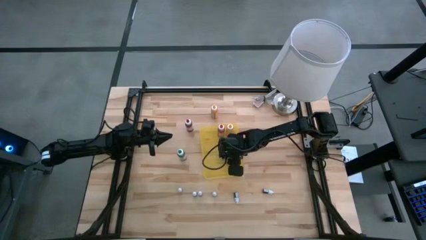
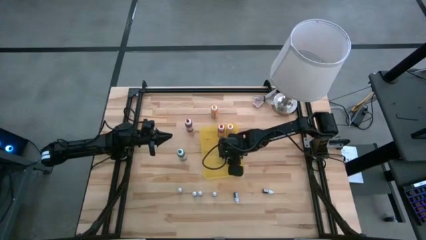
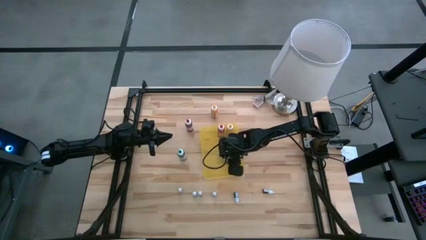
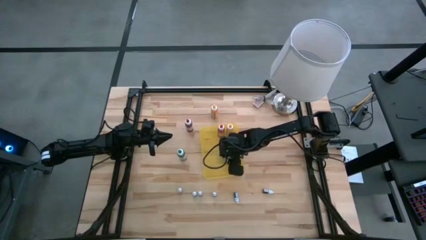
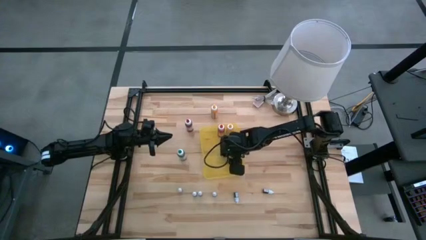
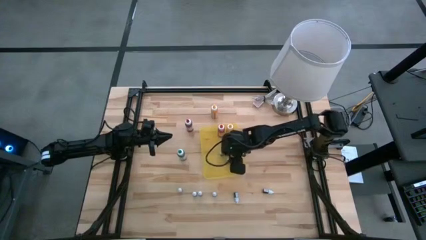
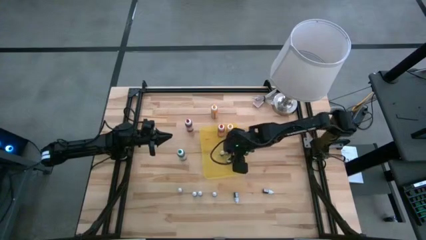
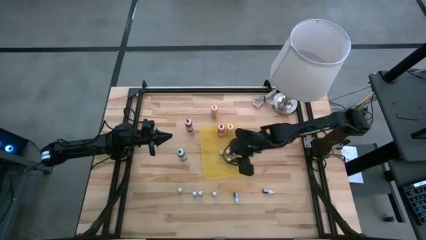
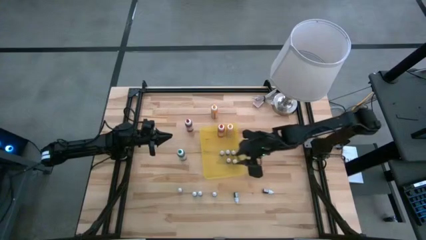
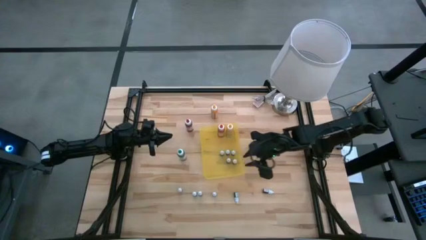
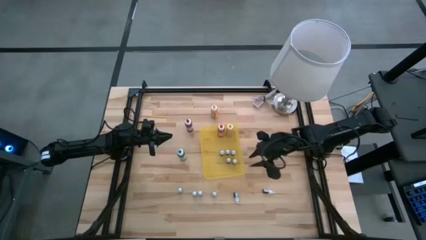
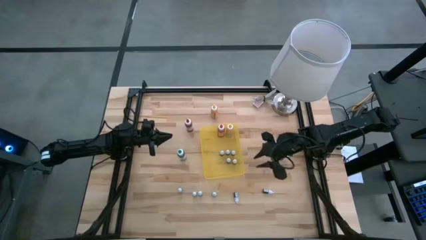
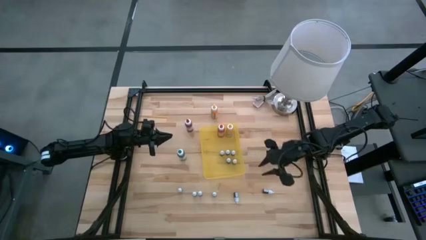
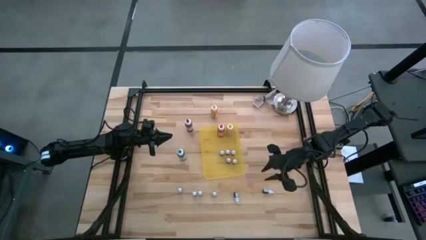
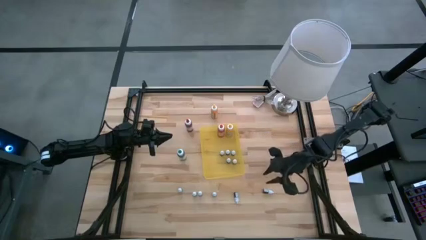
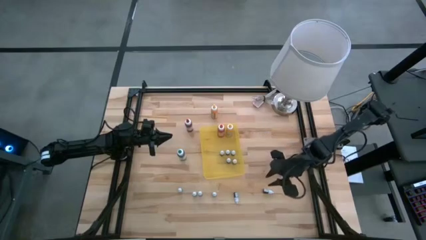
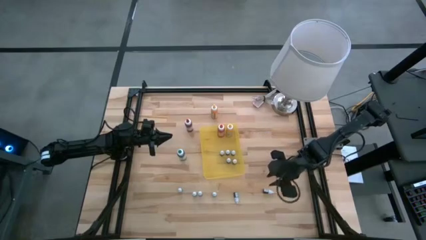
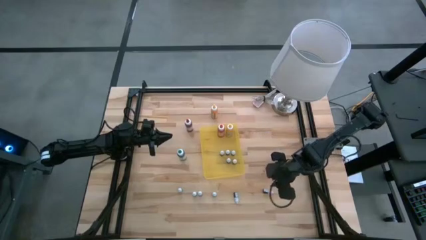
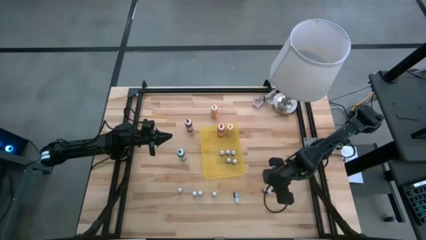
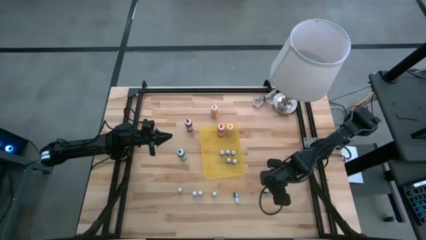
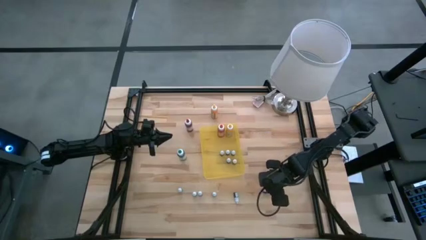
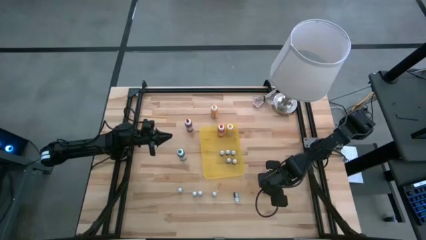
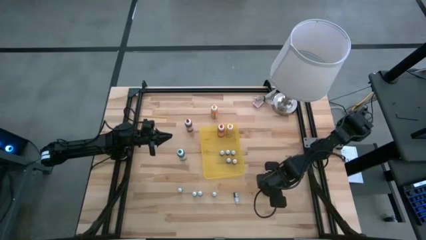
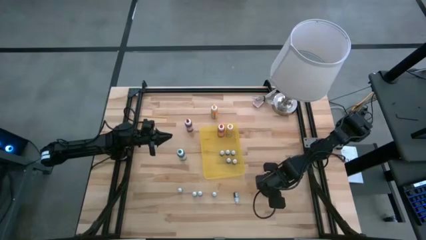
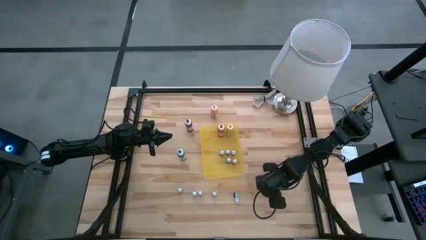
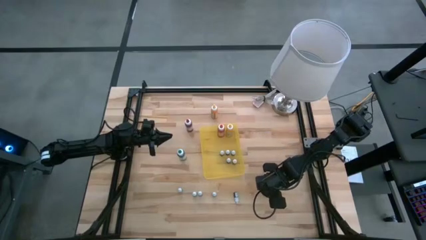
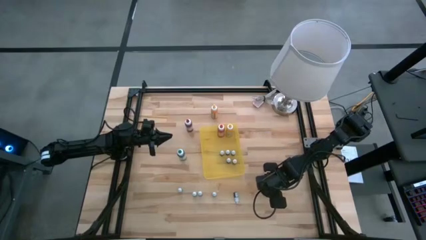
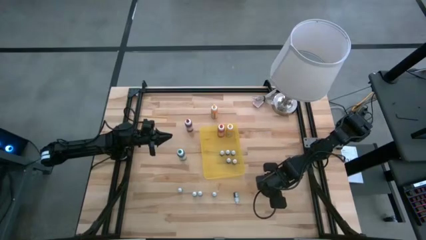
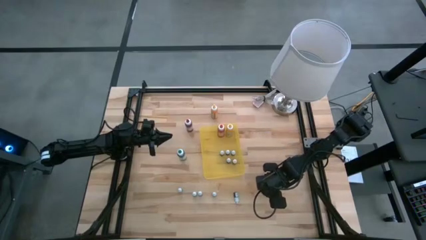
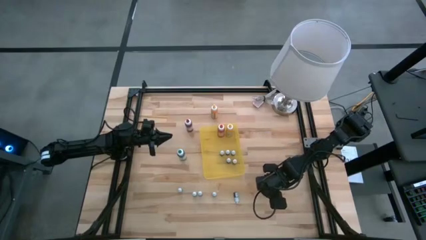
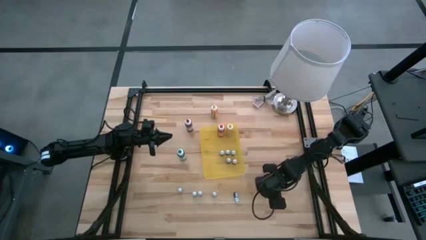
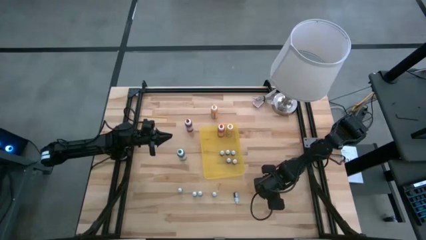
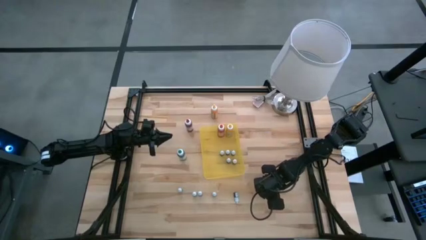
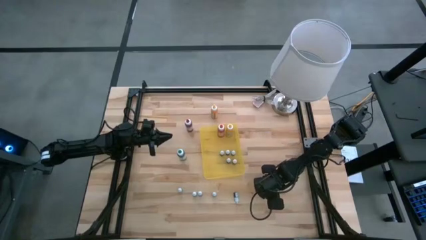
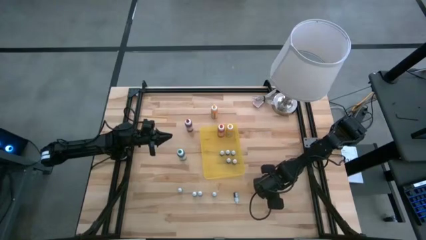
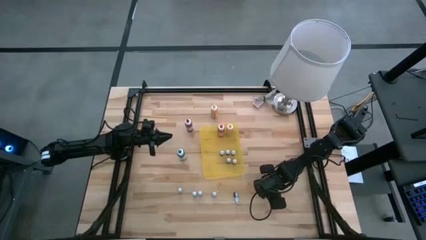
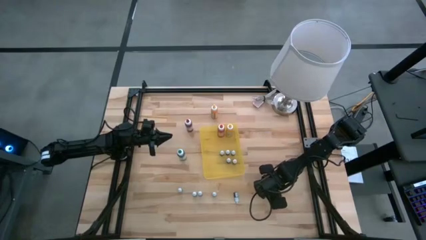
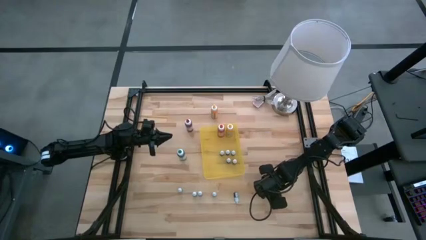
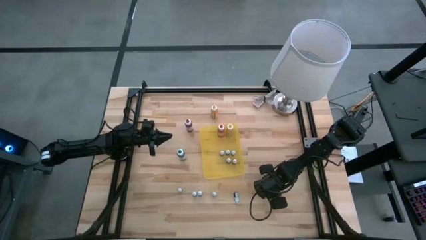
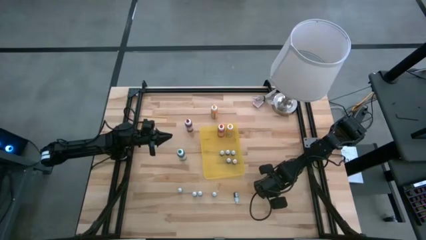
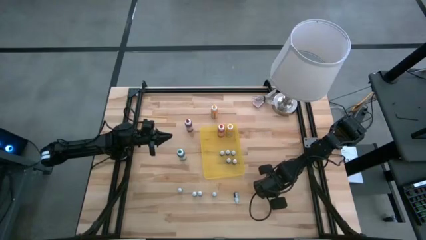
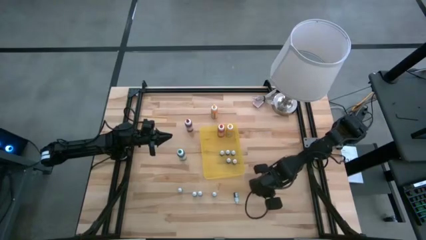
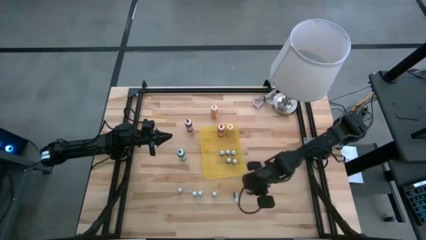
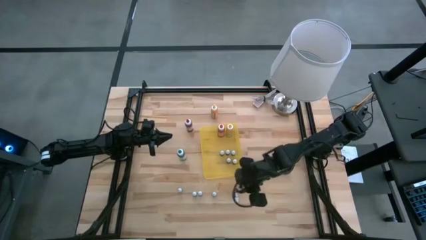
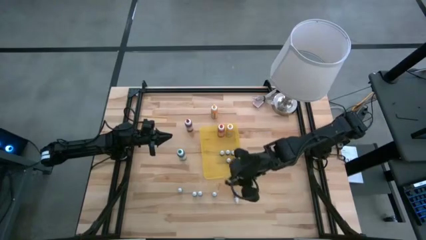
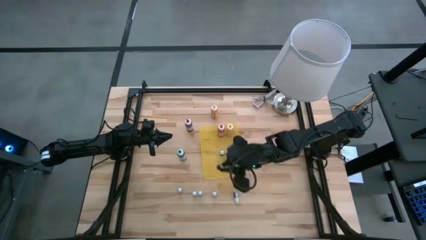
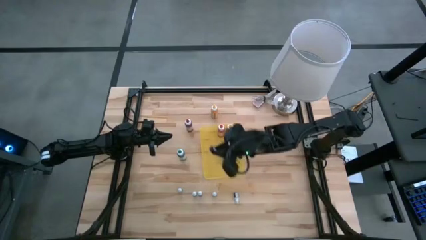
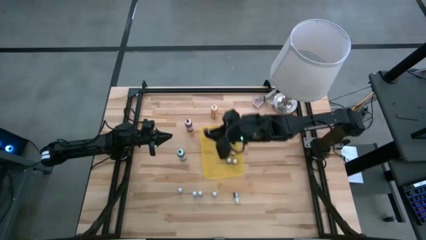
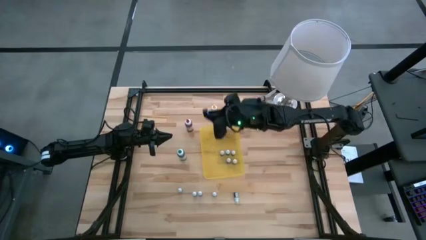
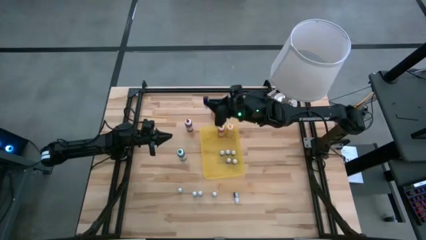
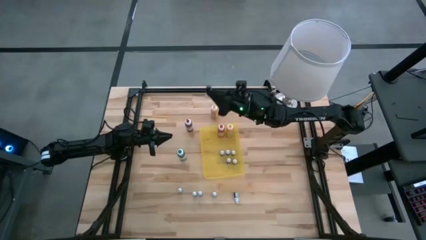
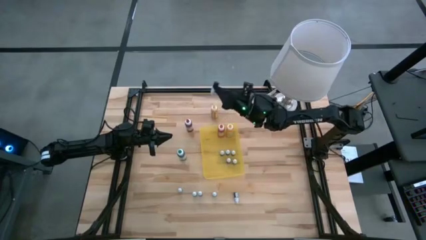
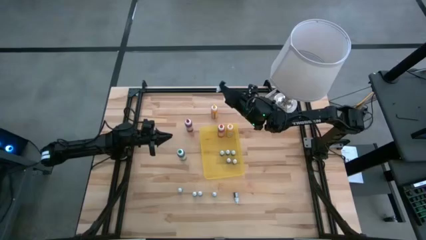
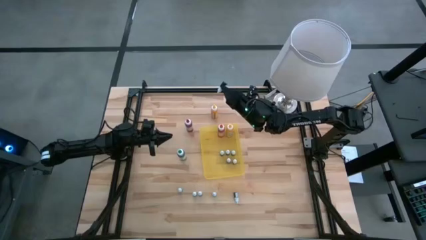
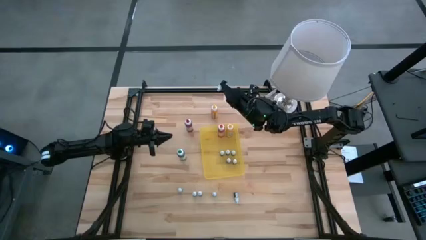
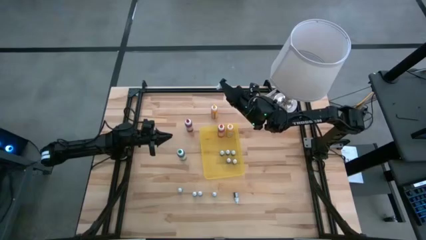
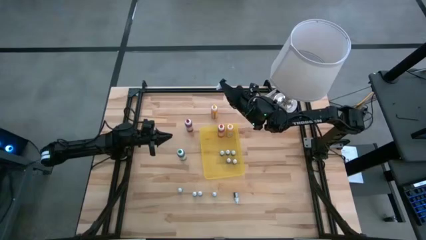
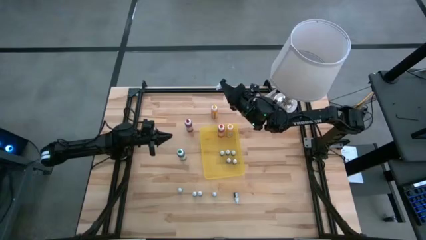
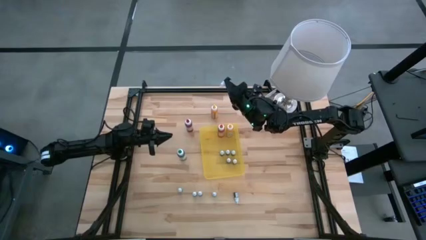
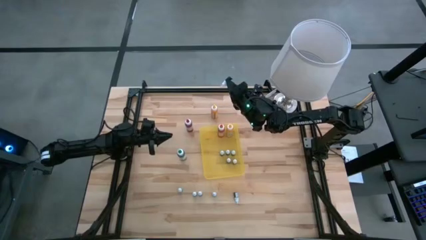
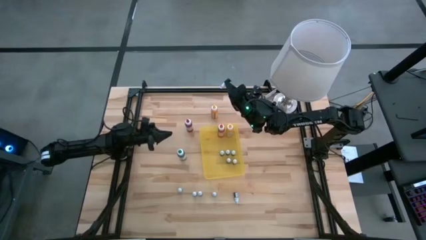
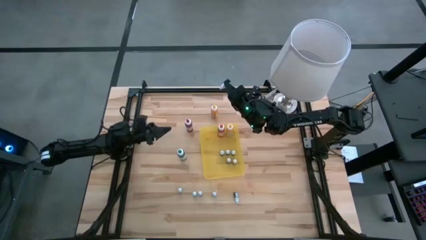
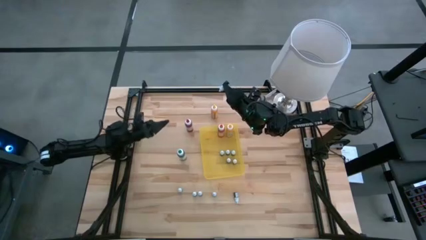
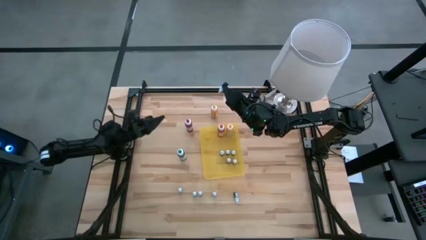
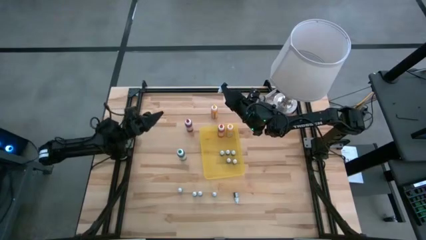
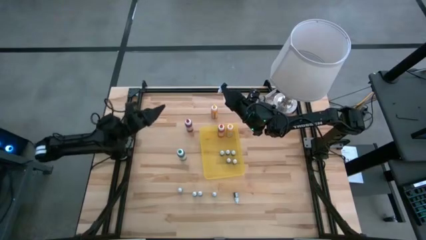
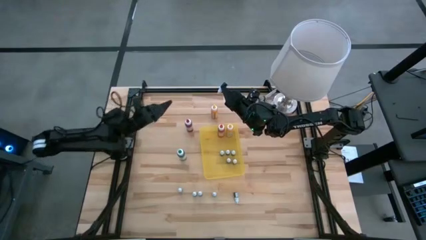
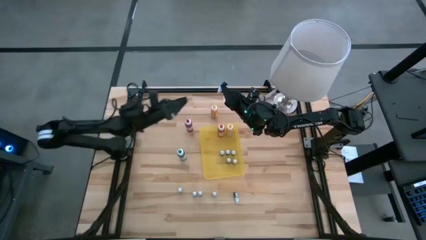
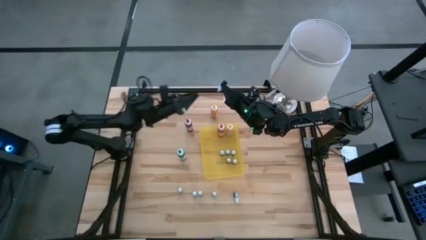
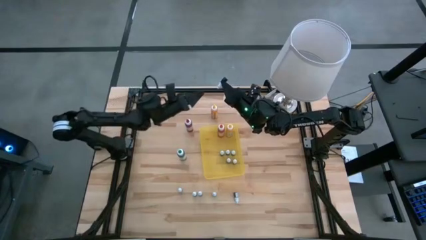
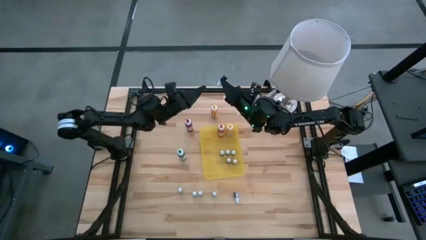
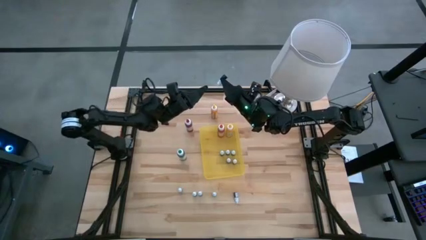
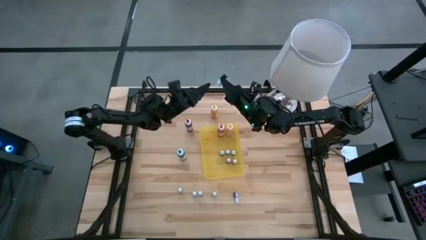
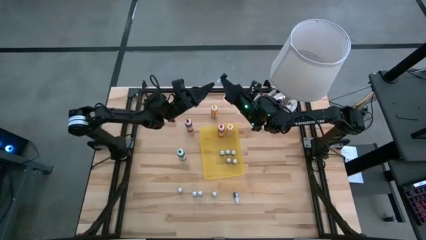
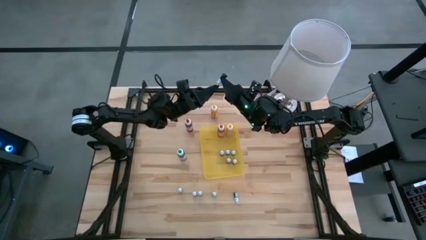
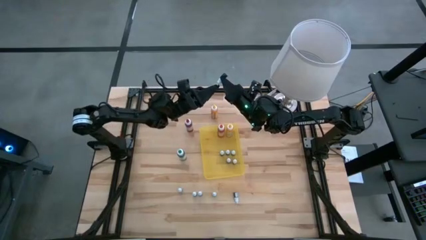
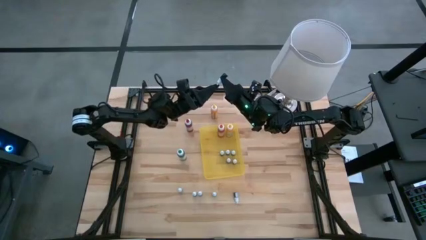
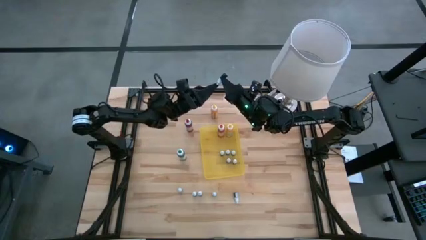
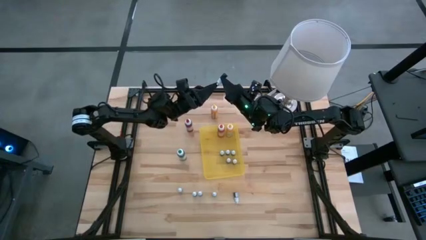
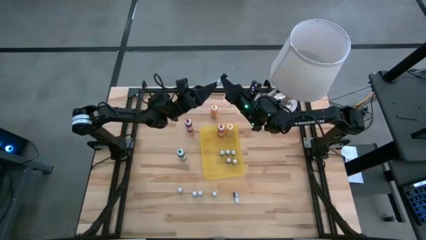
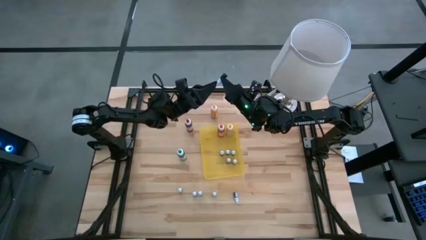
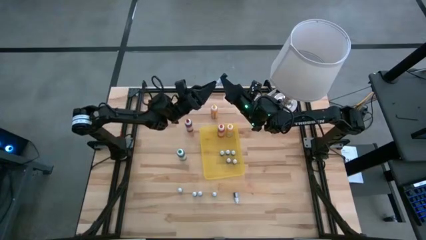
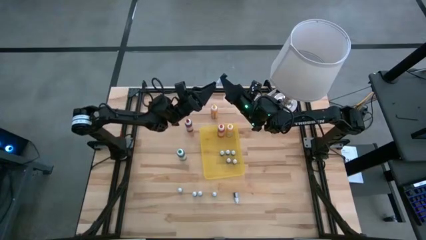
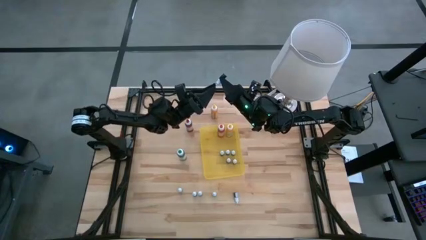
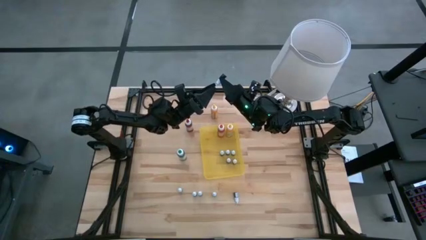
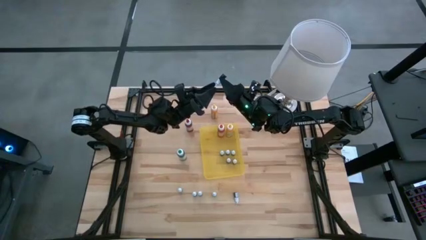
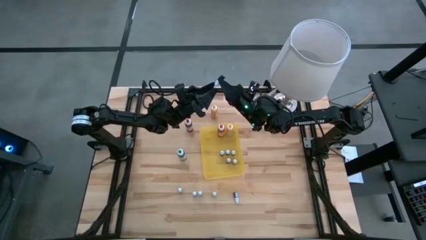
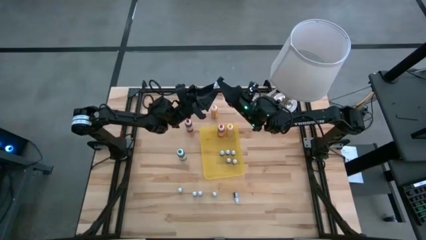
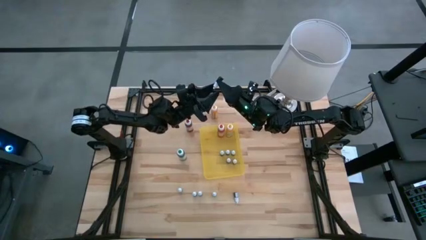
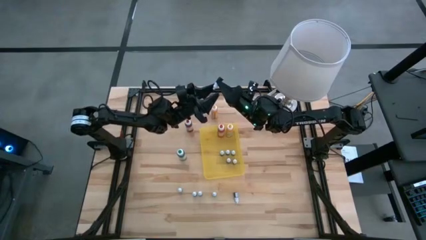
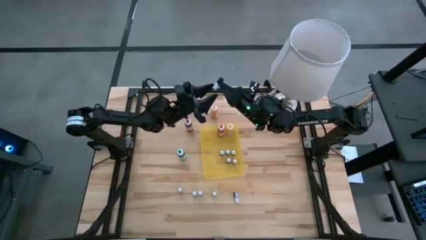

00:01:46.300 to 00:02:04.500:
Task: Pick & Place food coloring
Put the small pink food coloring bottle into the bin
